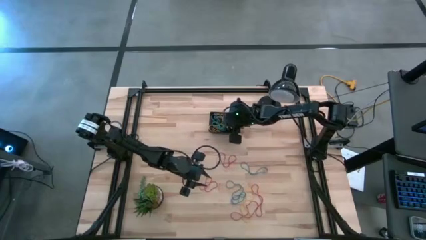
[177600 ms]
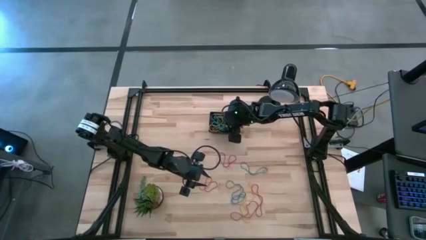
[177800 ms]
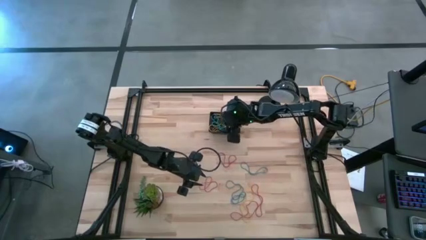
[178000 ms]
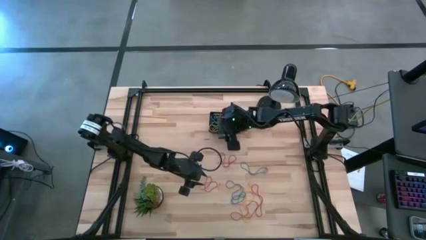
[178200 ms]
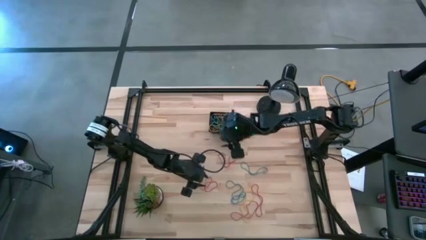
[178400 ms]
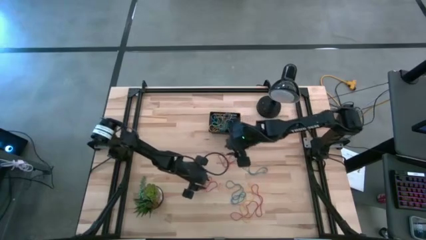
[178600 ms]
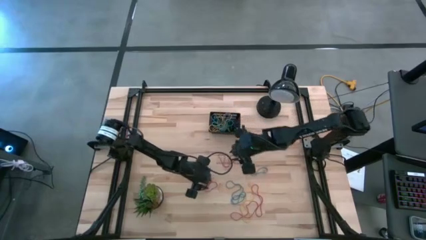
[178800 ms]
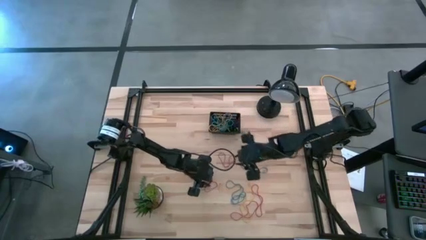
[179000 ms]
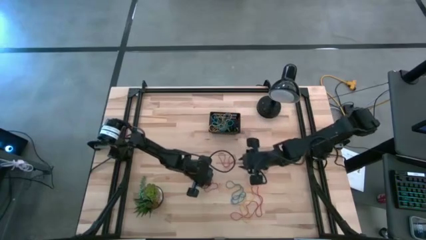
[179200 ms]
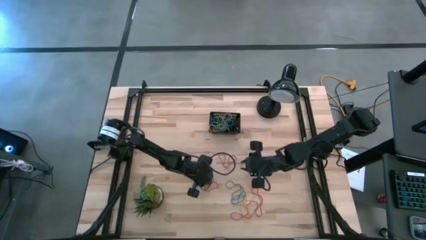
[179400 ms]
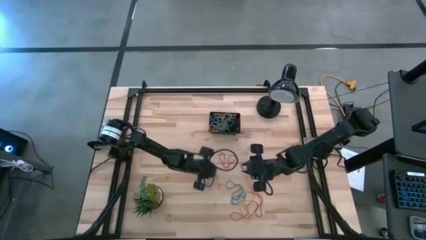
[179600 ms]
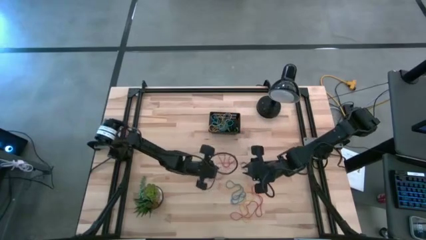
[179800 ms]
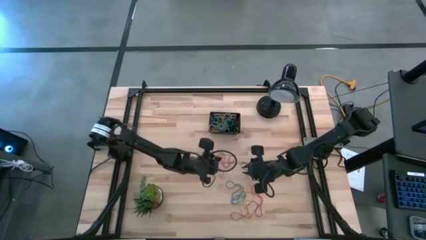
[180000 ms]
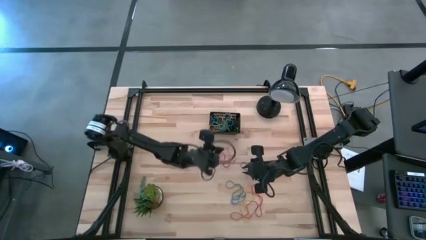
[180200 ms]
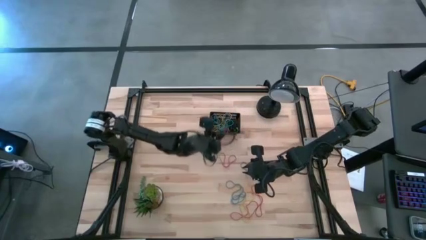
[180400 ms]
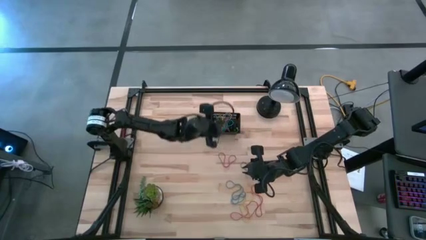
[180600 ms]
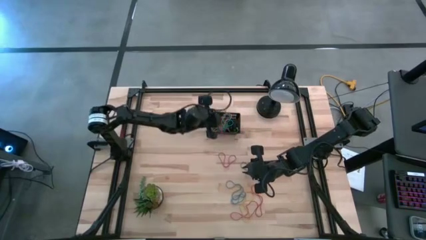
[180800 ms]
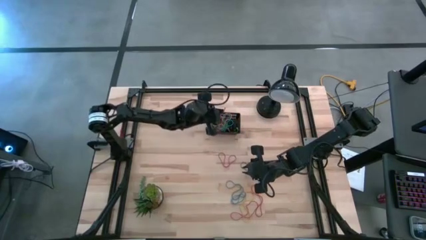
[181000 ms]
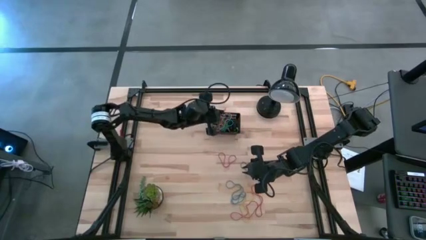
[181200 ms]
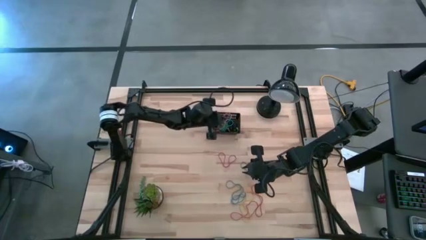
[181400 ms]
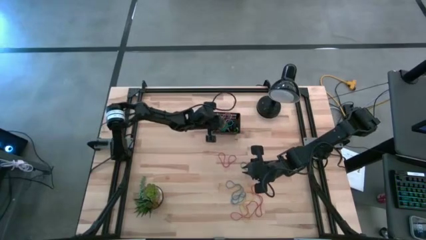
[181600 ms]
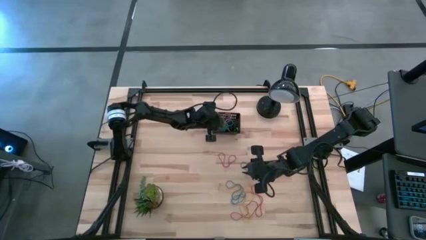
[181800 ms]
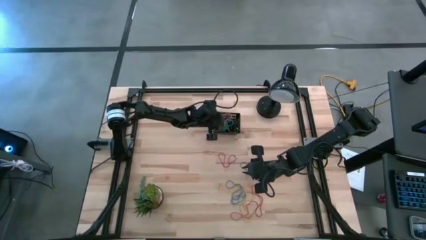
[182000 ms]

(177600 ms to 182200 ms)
Task: Pick and place rubber bands into bin
Put the red rubber band into the basket

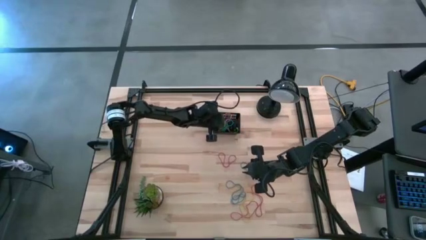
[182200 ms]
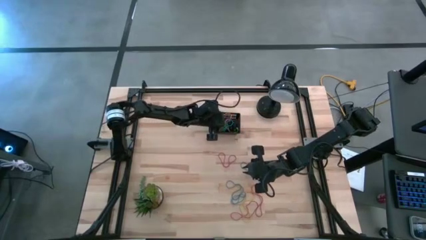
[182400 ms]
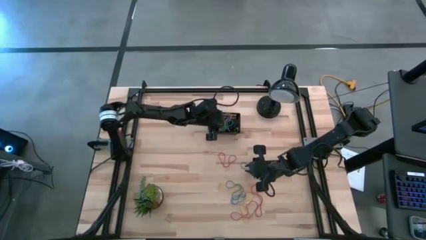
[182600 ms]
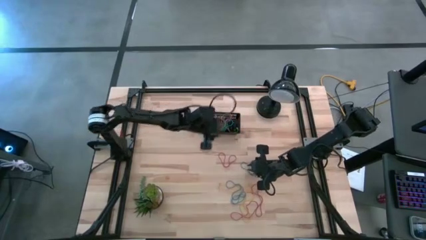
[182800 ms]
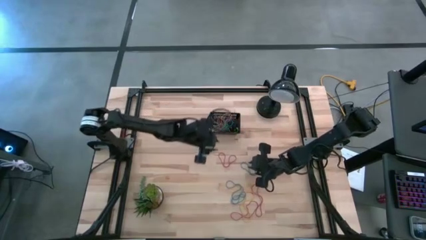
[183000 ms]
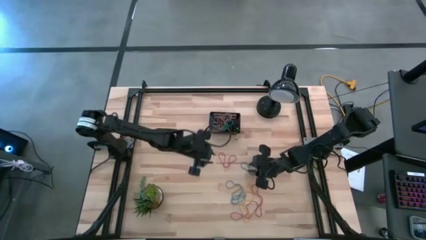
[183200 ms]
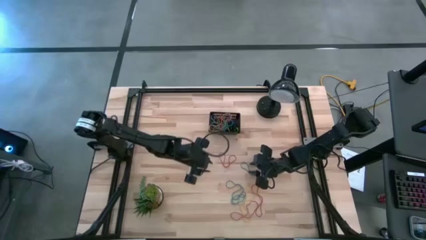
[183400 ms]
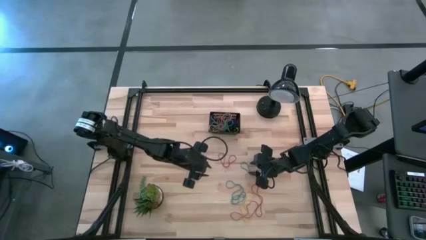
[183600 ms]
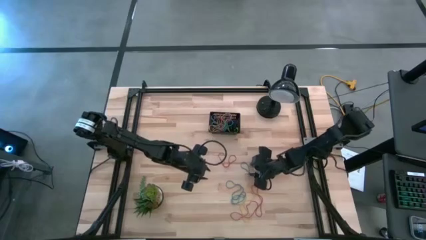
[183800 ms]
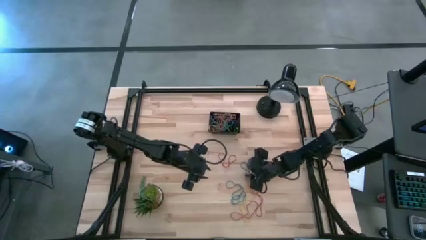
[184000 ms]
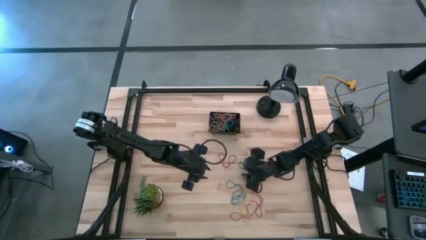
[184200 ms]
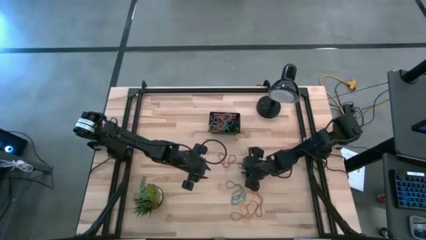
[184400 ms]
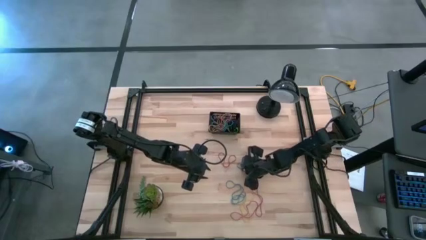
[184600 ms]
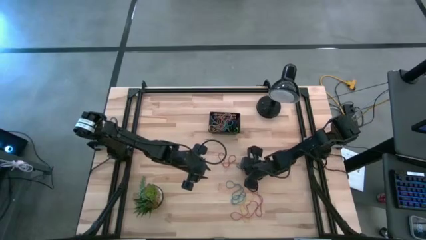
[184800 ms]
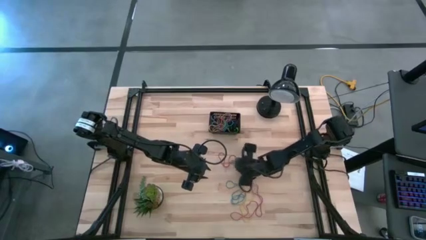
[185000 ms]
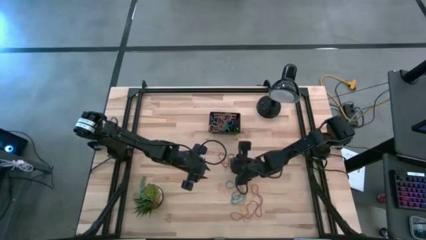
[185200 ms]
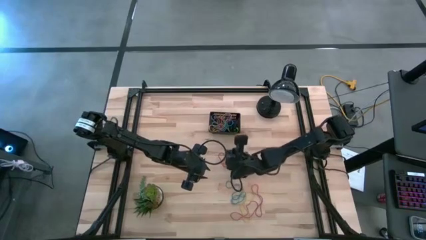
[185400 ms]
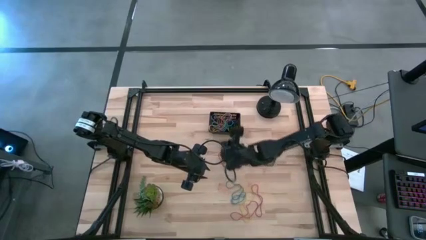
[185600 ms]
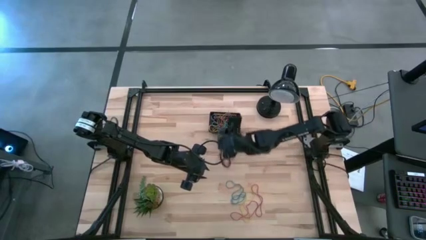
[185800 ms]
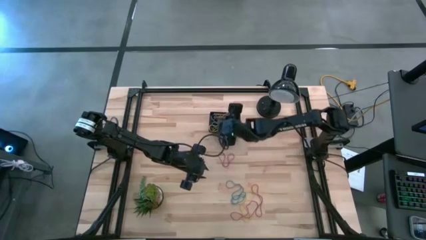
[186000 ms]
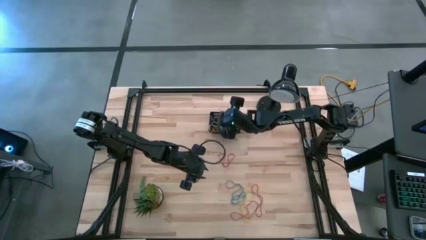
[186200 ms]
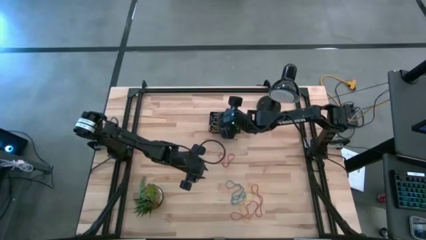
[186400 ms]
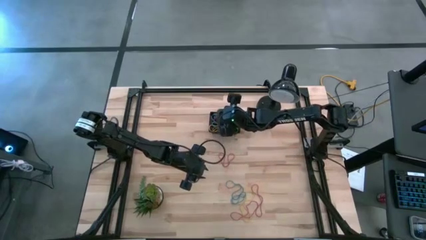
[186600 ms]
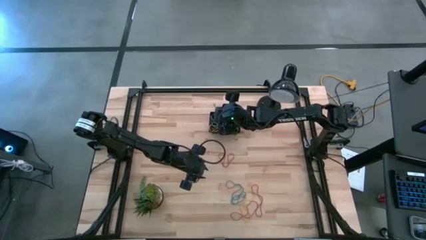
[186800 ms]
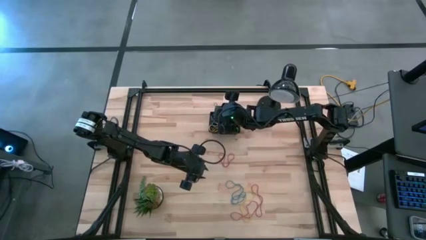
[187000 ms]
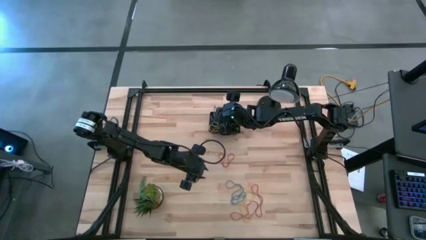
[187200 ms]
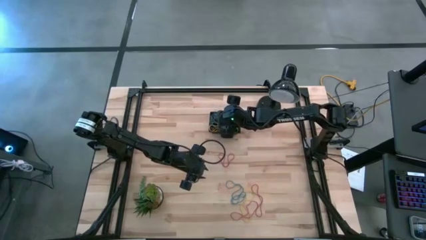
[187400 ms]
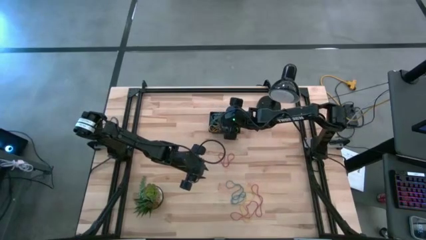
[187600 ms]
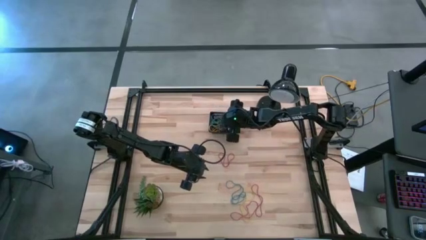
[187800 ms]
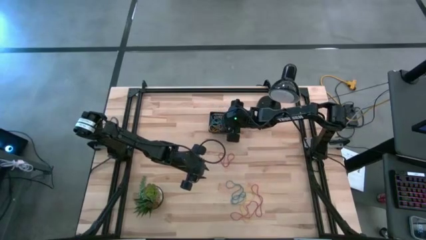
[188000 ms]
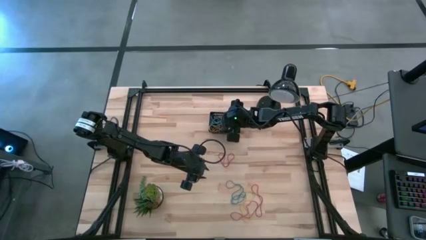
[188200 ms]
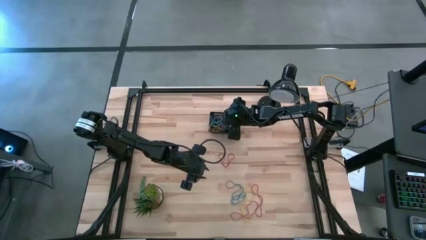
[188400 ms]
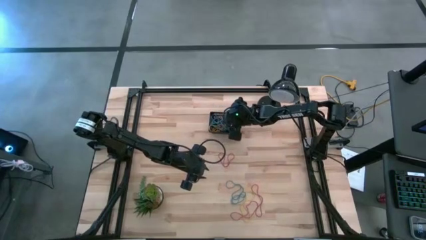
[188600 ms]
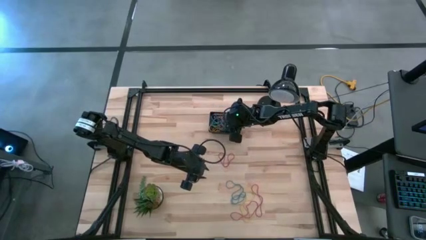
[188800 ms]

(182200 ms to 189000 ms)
Put the blue rubber band into the basket

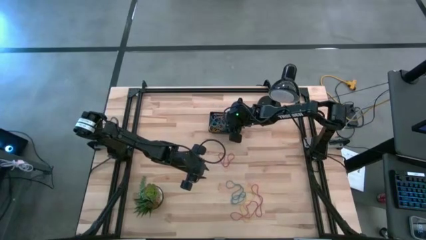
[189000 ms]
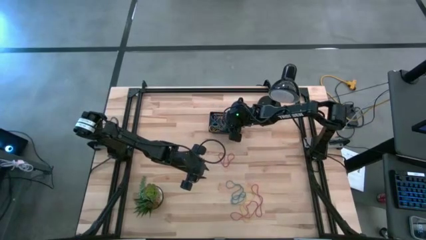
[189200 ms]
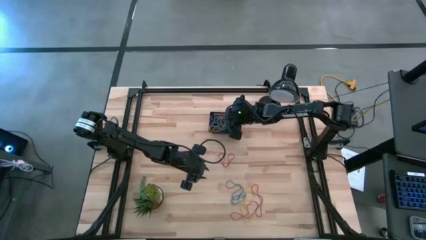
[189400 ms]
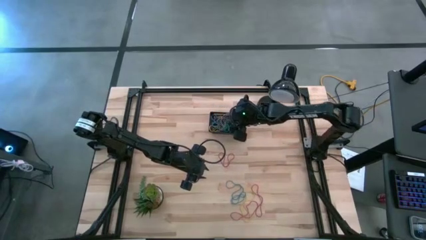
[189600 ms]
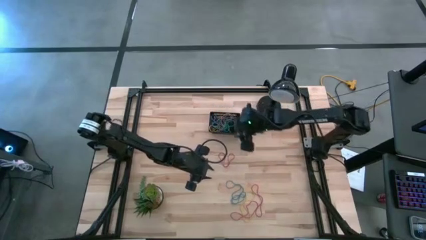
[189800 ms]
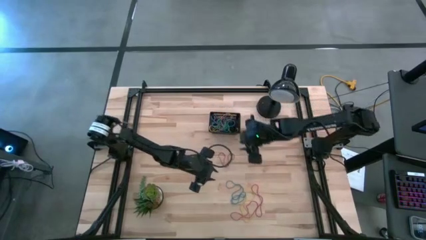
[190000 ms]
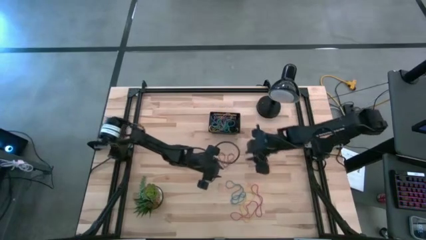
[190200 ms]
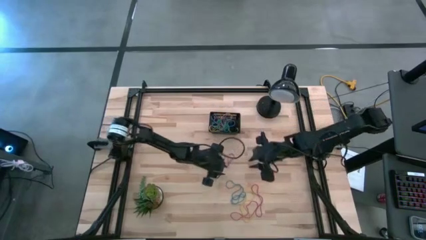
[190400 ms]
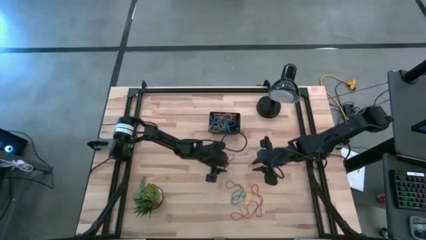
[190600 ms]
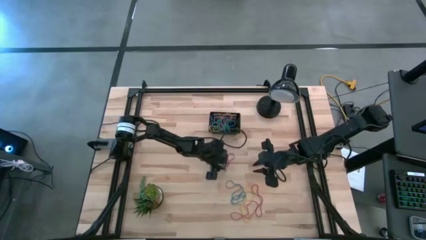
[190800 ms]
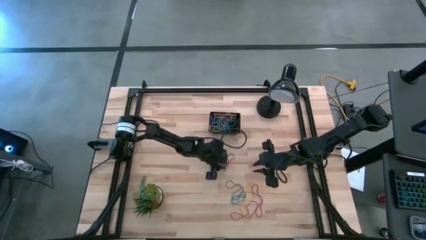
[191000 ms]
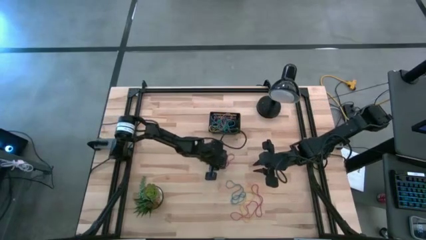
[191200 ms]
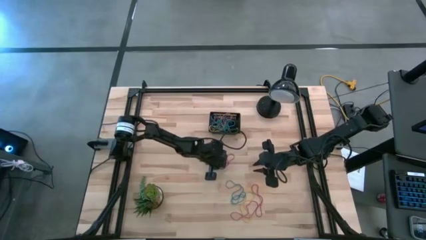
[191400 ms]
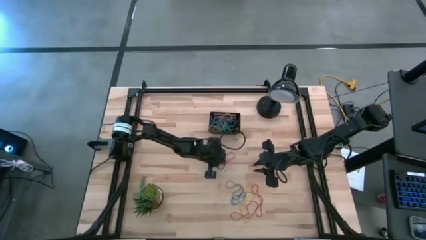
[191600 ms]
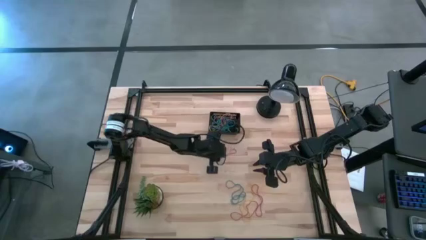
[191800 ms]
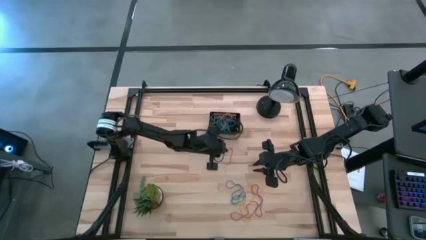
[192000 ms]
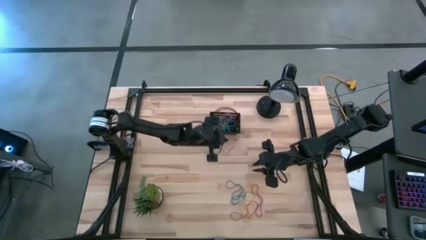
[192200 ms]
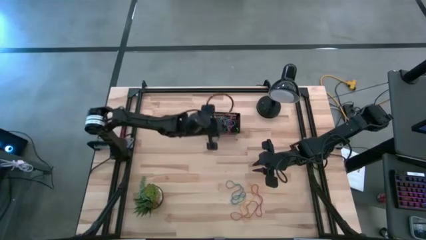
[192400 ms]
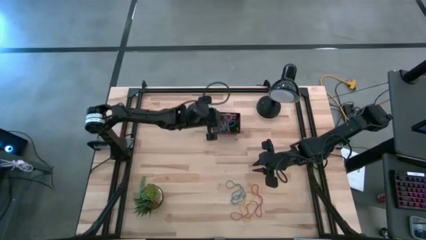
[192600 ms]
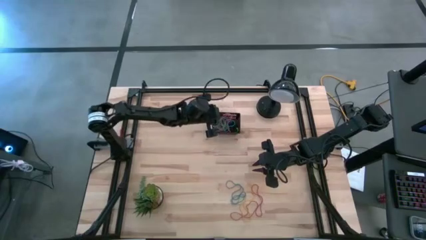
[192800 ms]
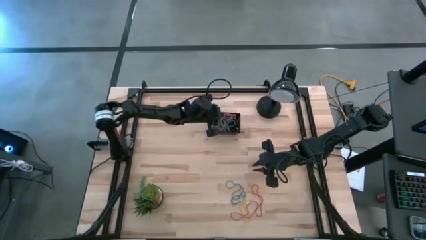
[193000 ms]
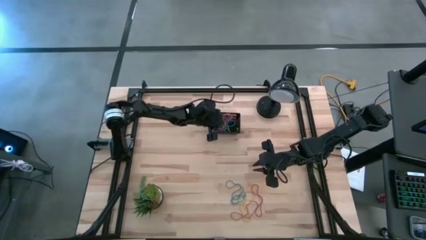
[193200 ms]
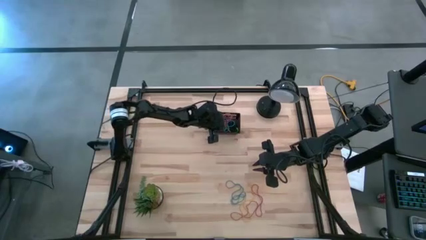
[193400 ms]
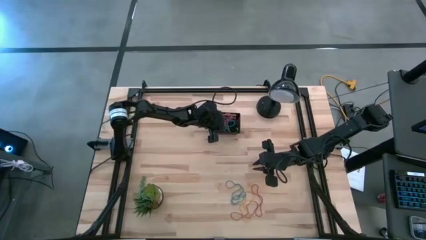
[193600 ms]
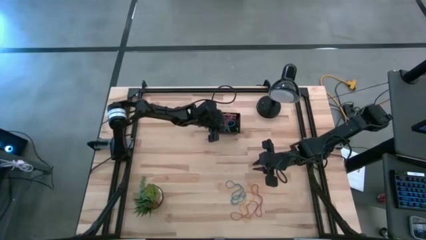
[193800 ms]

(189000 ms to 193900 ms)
Put the red rubber band into the basket
